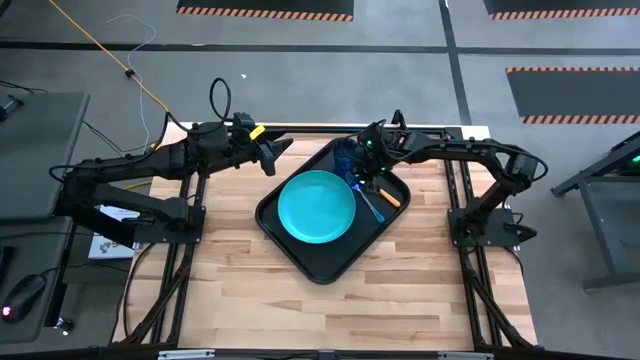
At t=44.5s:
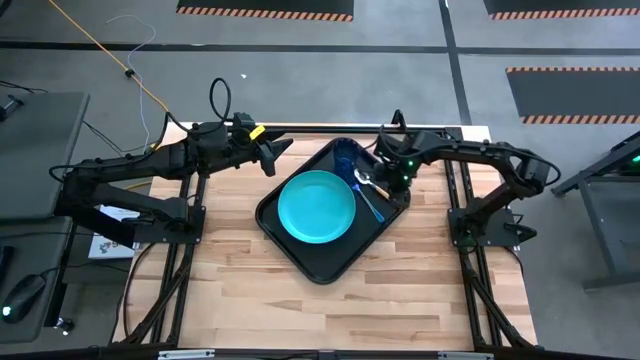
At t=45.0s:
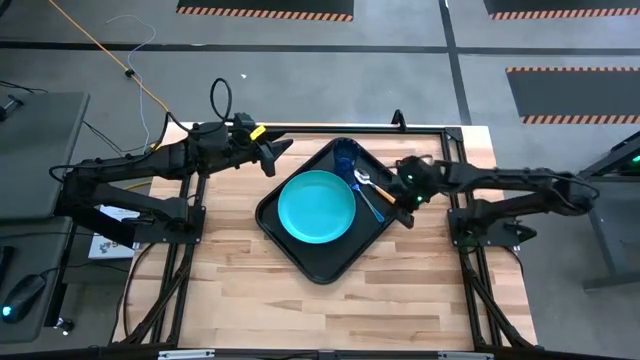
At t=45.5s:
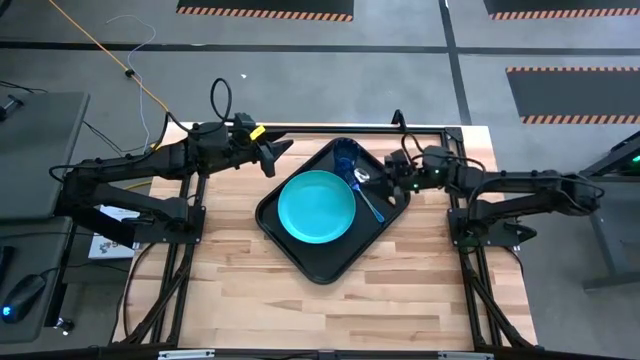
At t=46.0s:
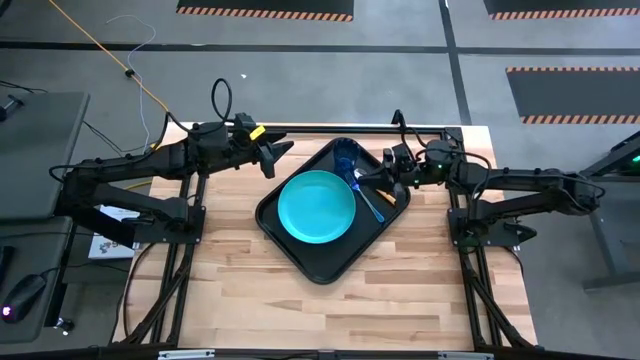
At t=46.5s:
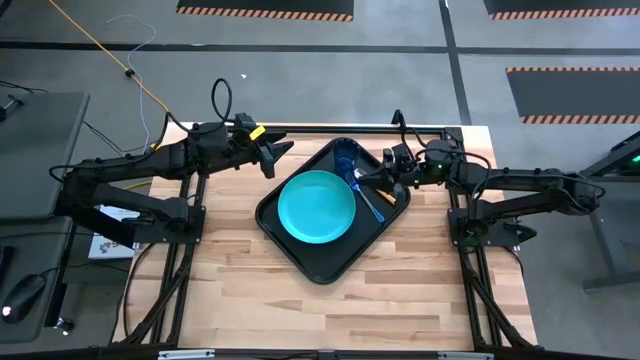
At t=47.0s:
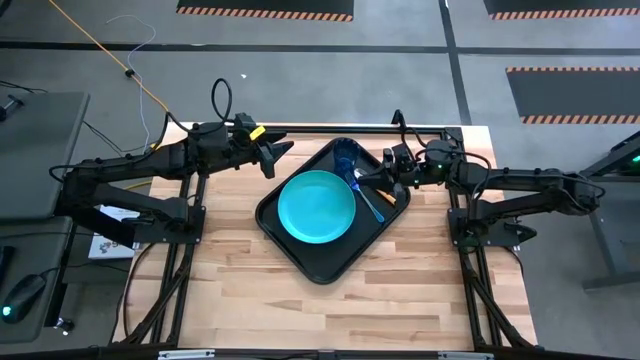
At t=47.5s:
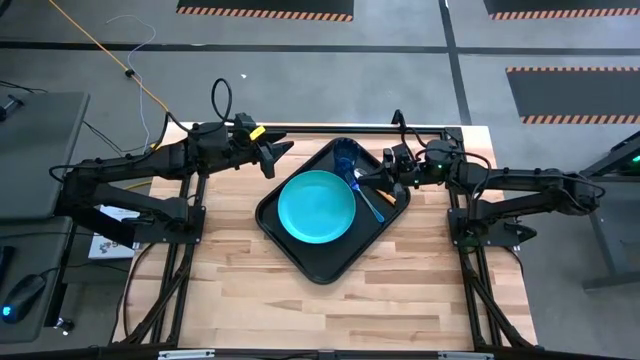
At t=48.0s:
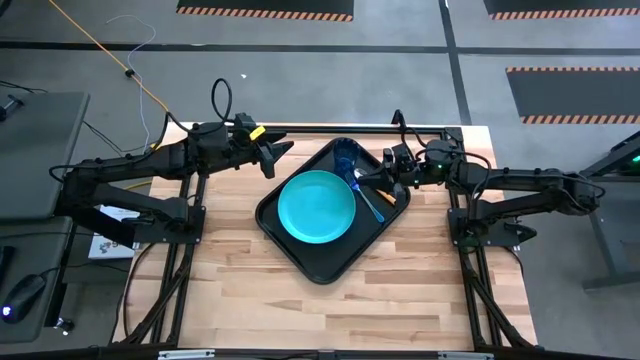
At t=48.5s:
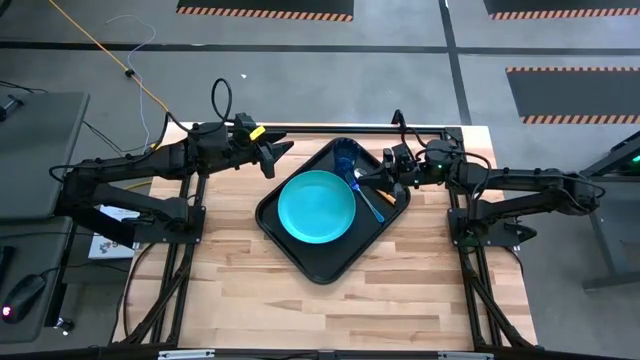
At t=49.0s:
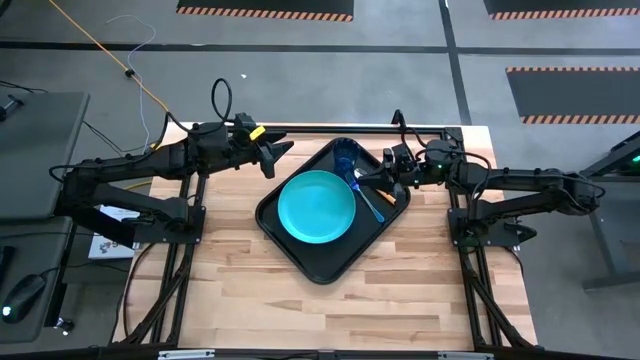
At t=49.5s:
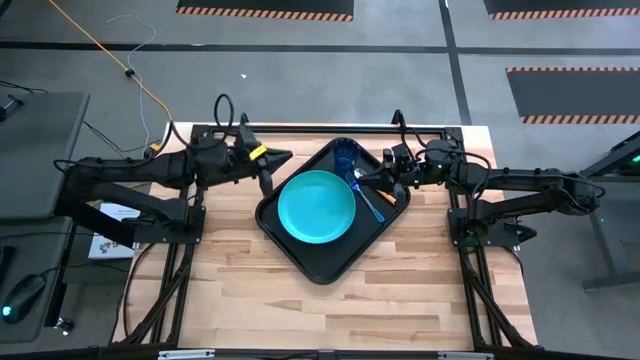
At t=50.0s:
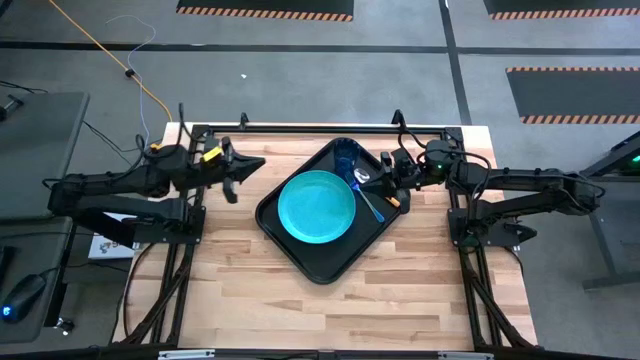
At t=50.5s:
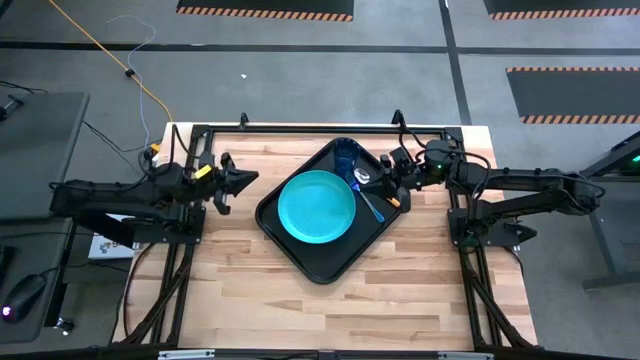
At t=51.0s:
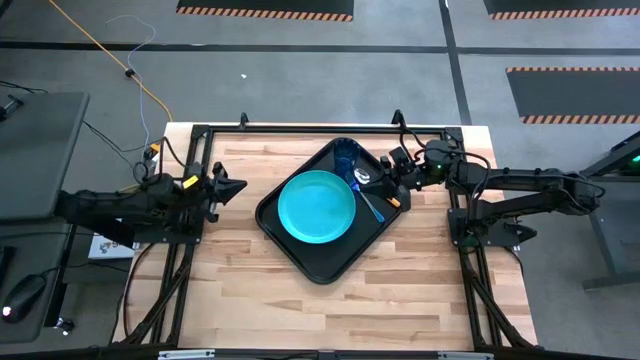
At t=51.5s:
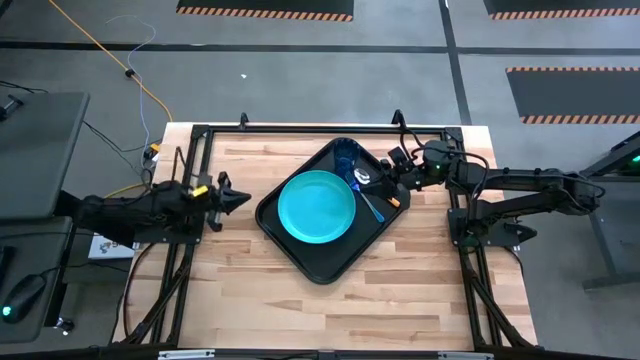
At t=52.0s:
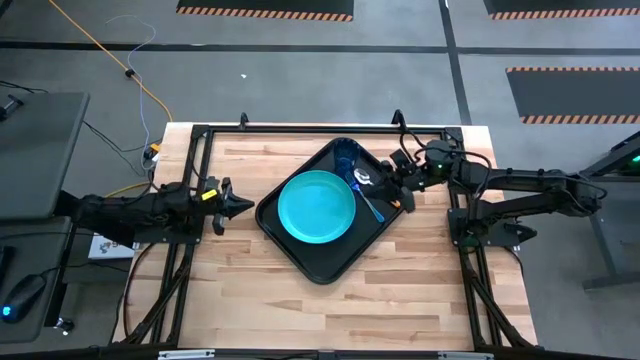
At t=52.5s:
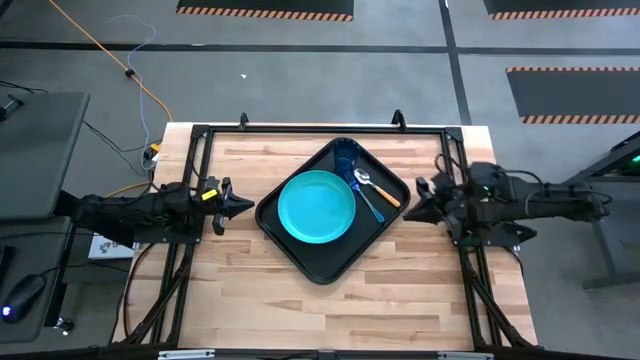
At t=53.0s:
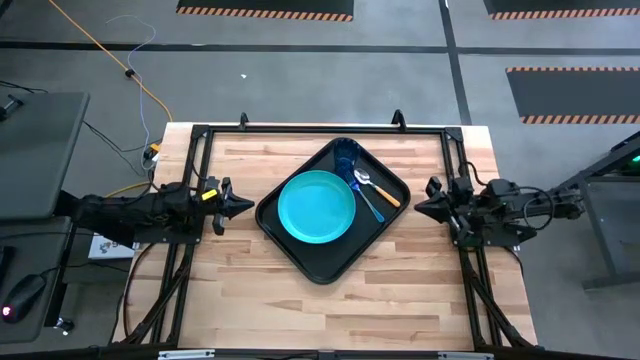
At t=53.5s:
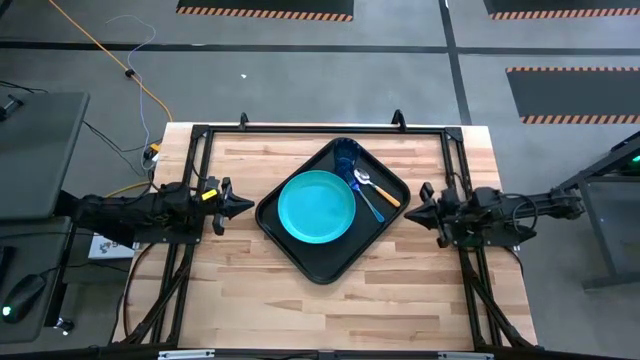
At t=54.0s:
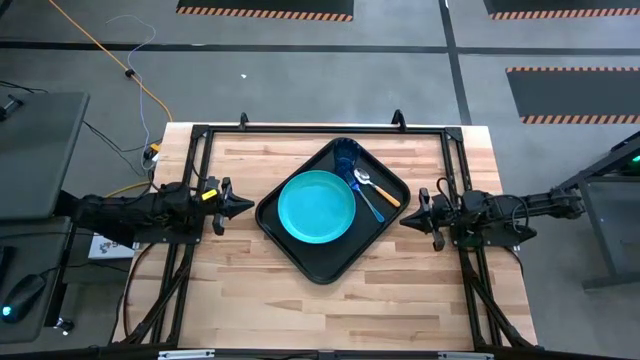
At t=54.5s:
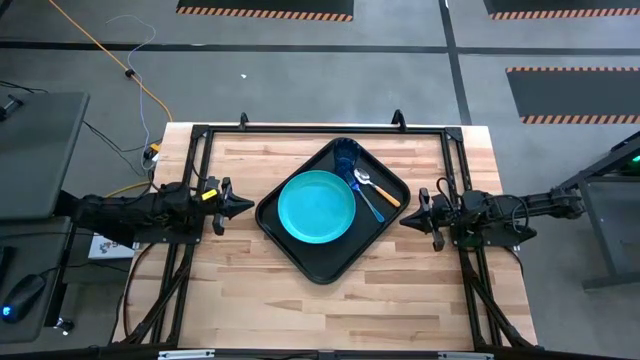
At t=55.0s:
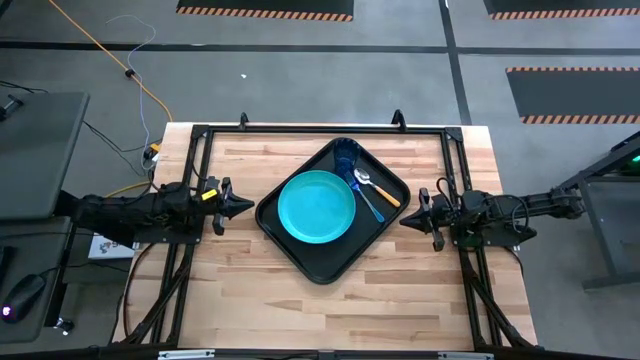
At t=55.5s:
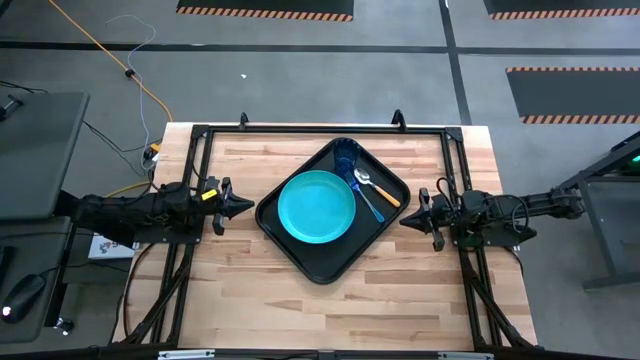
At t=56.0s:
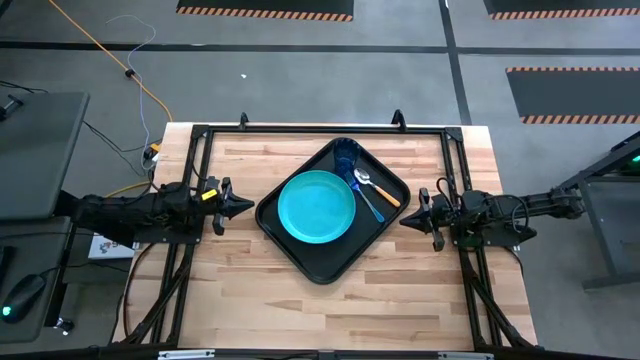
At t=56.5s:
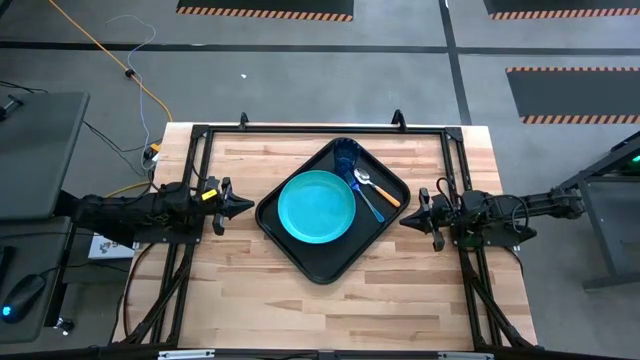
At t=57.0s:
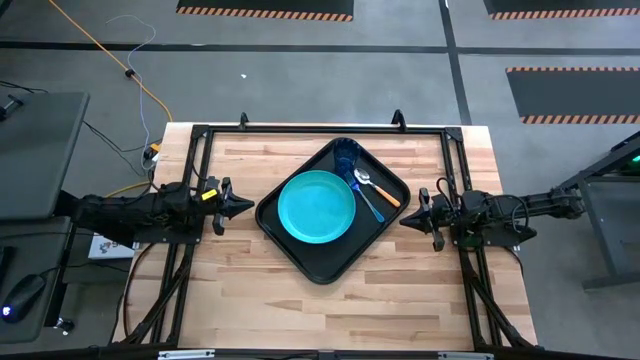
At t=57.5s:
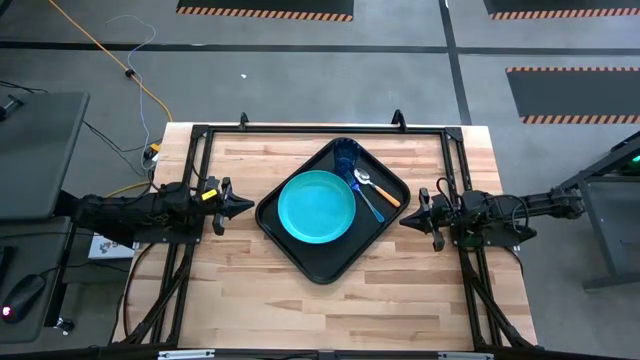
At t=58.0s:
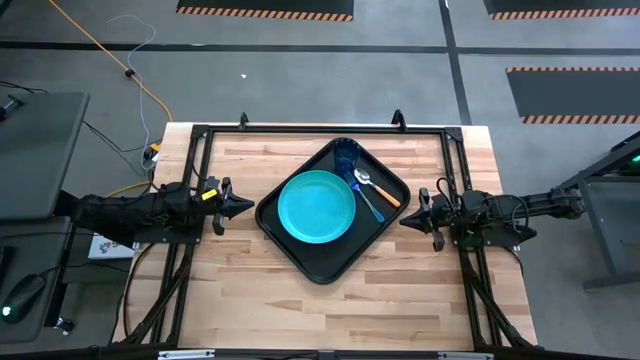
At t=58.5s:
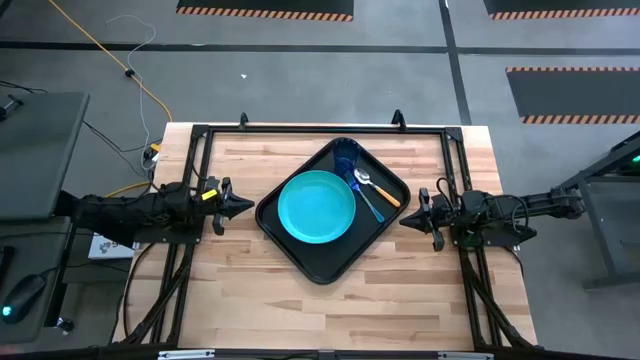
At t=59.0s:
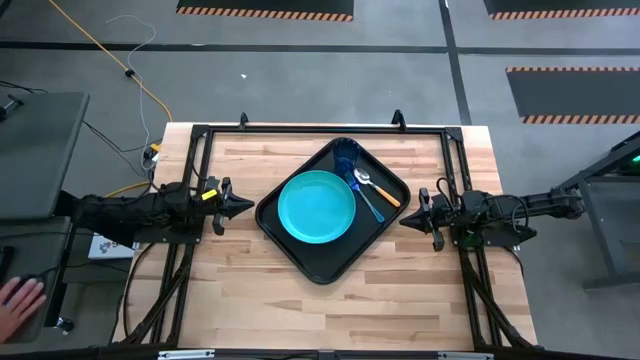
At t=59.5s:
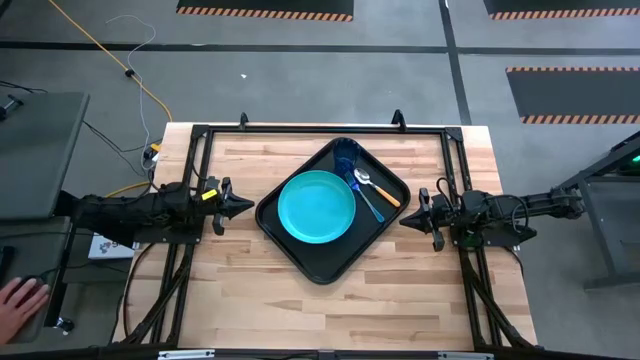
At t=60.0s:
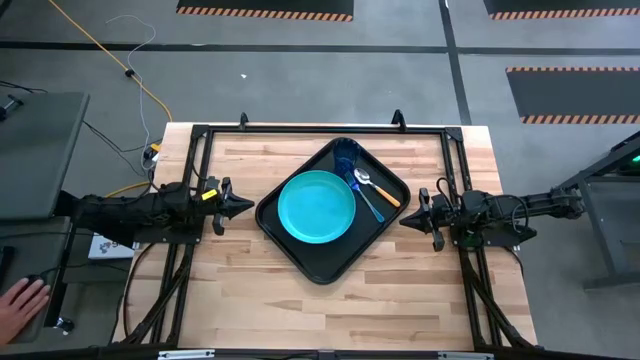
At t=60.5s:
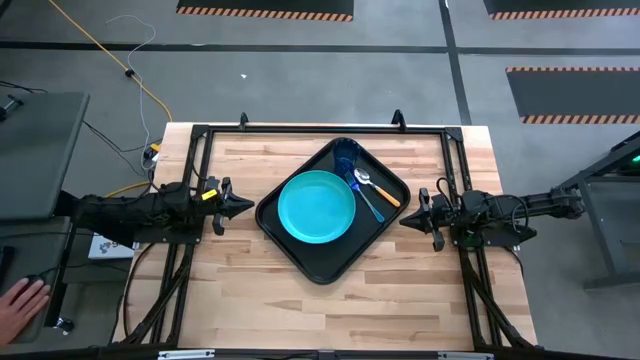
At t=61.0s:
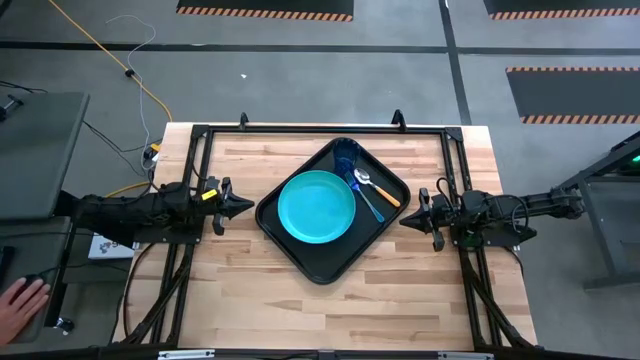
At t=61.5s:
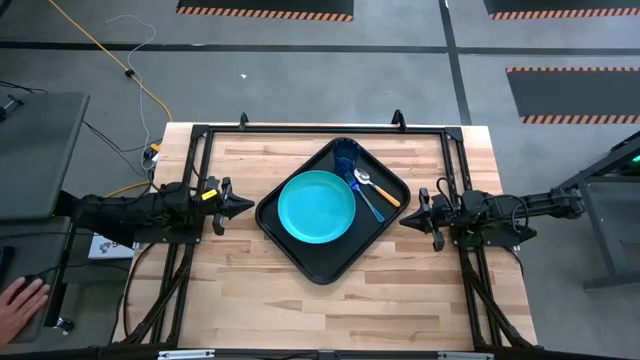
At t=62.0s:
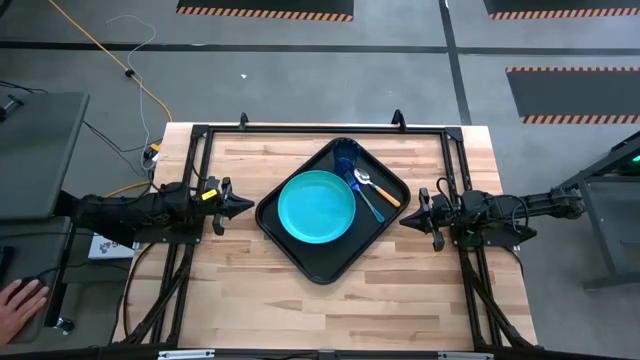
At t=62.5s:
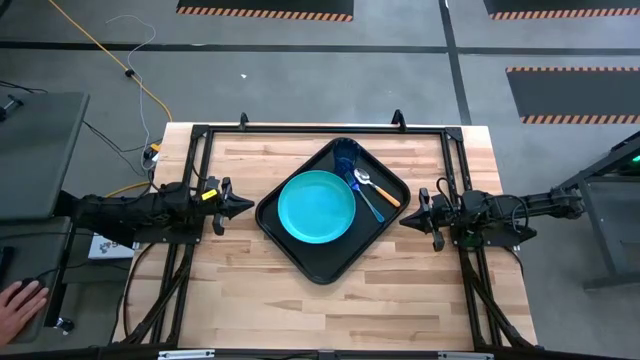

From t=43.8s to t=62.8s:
Task: Pick and place plate/cup/fork/spoon on tray
Return to Home Position

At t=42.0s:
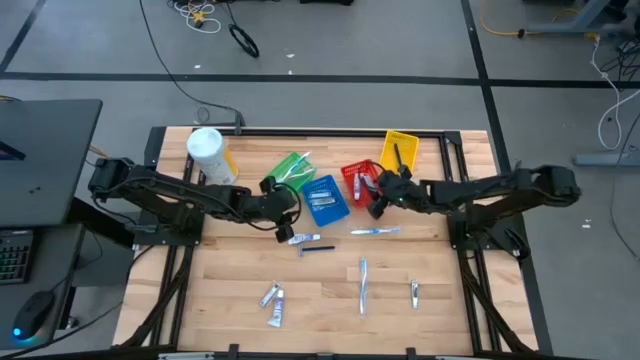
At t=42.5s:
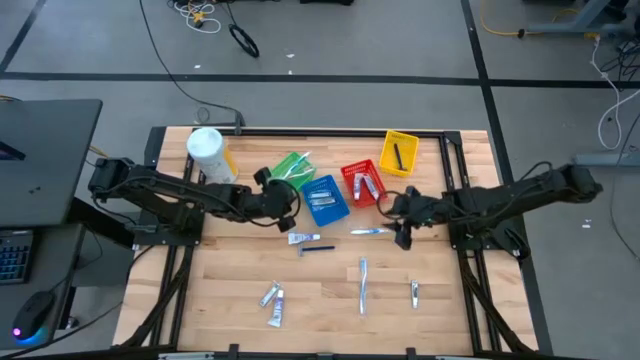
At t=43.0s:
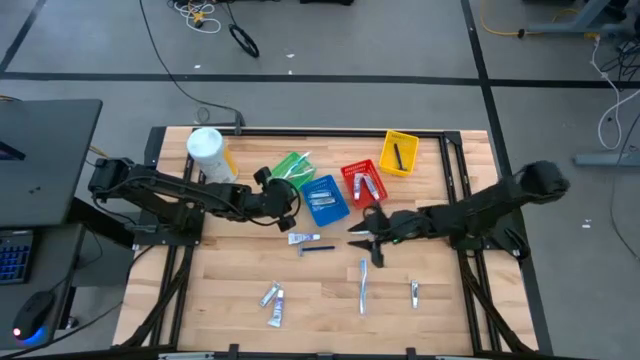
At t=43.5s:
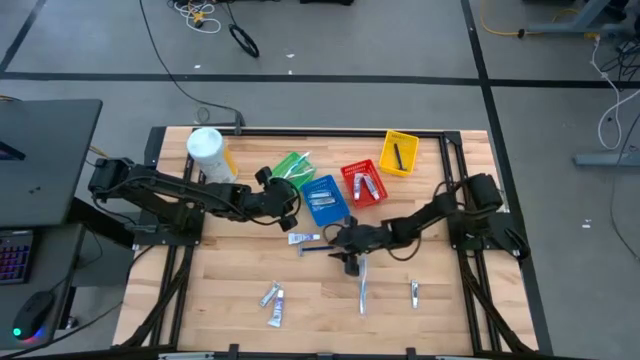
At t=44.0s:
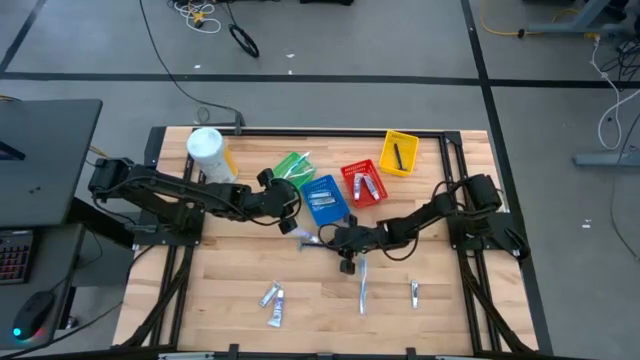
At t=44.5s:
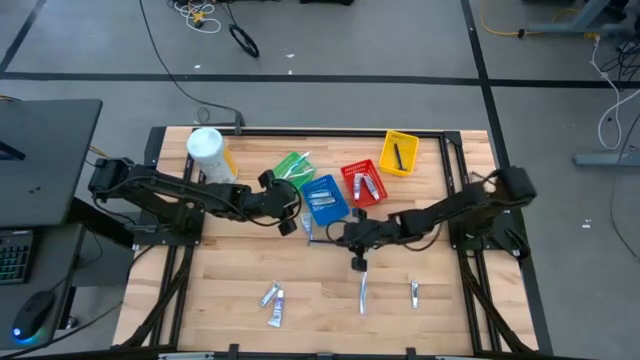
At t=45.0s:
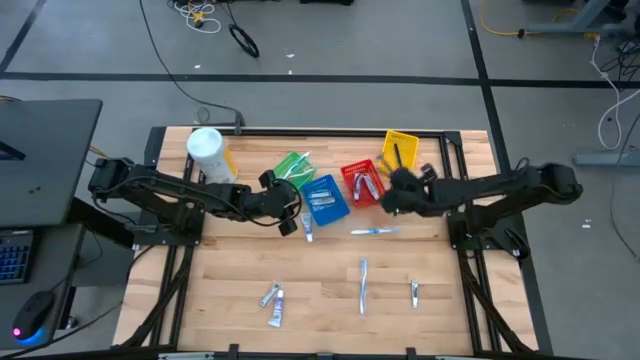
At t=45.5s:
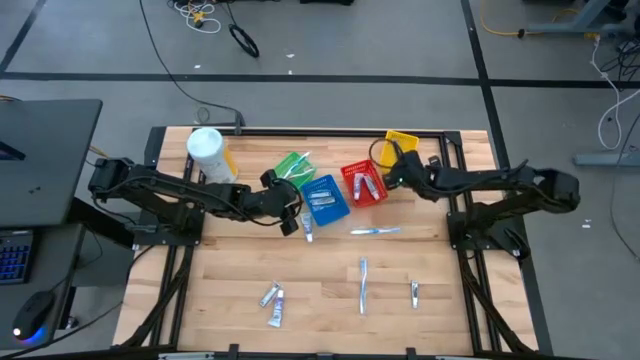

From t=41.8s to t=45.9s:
Task: Pick & Place Travel size toiletries
Put the black razor into the yellow bin
